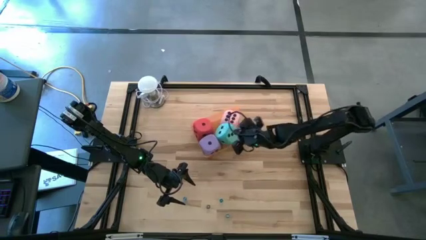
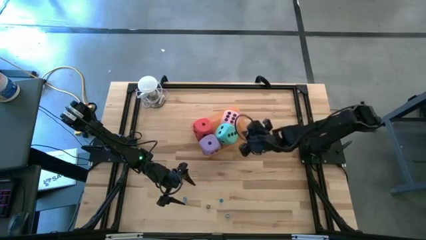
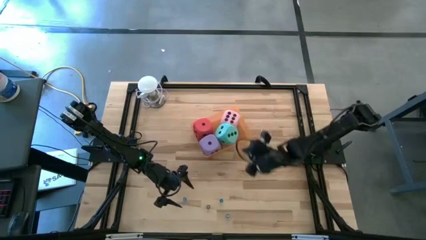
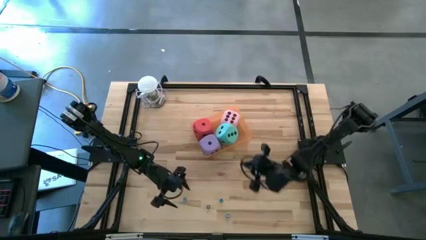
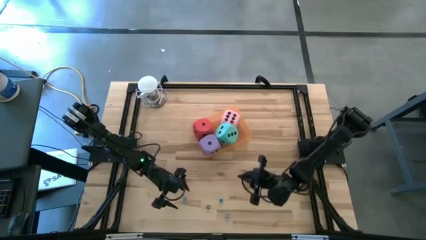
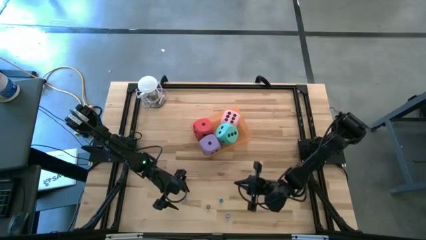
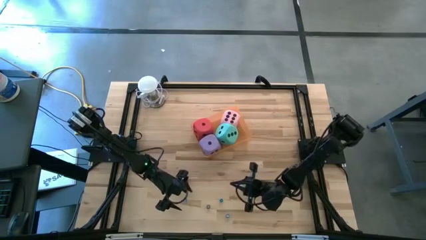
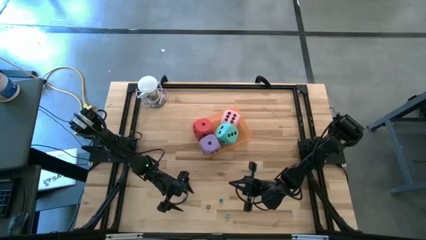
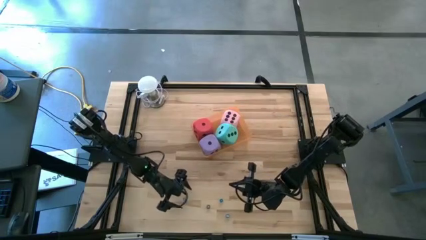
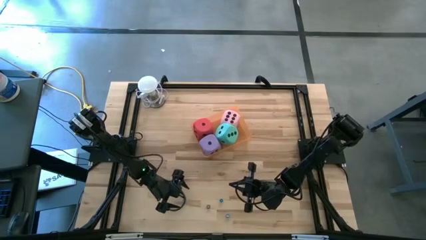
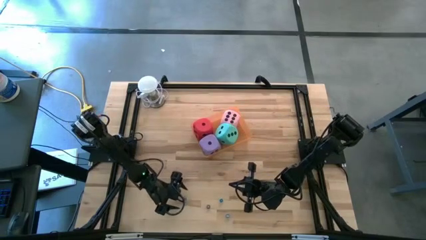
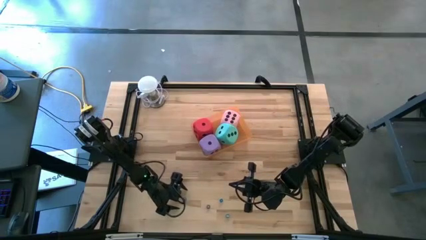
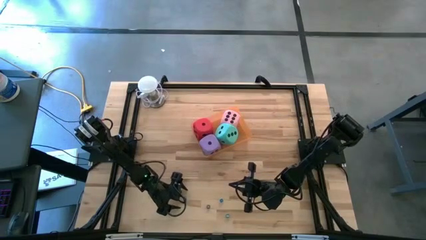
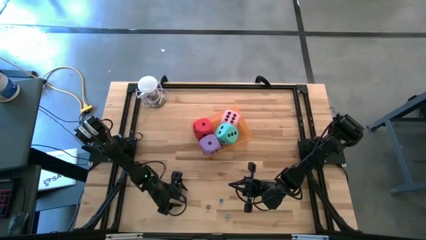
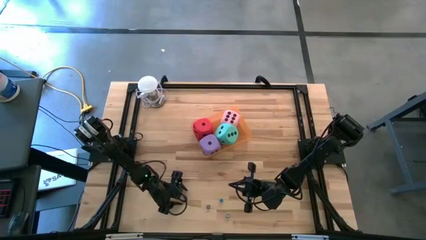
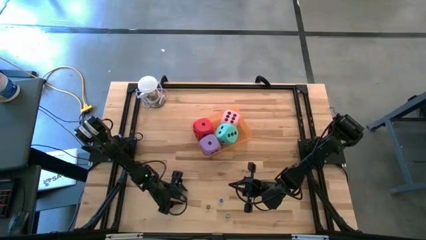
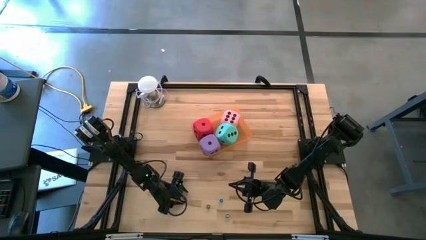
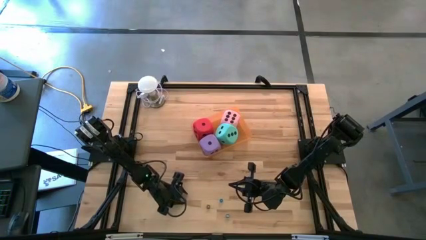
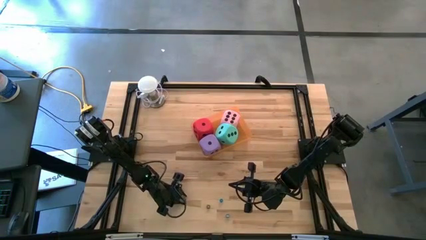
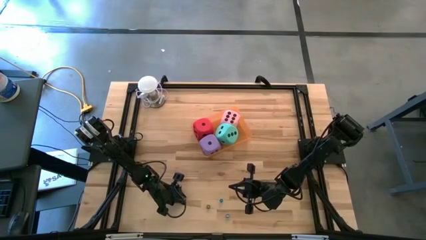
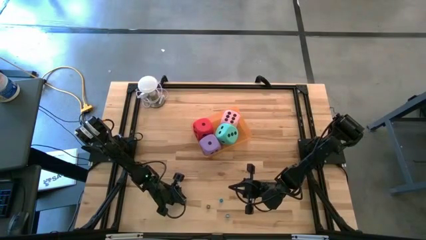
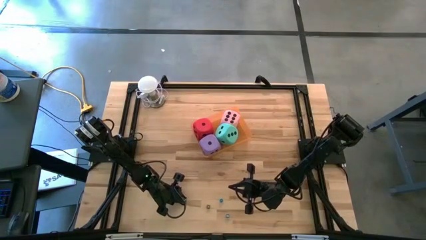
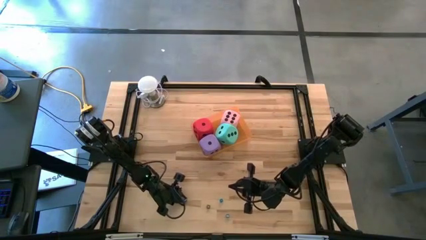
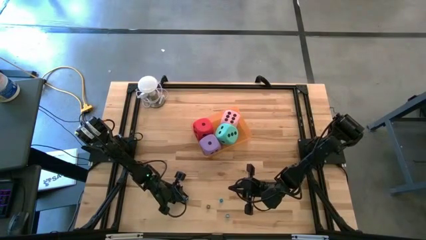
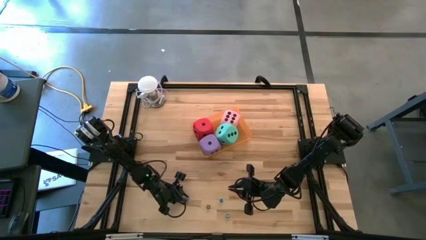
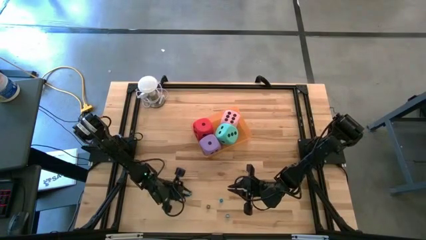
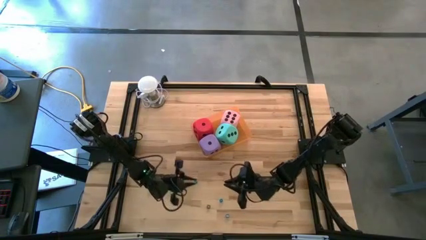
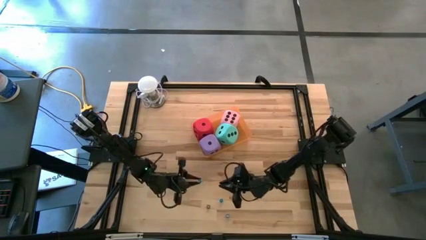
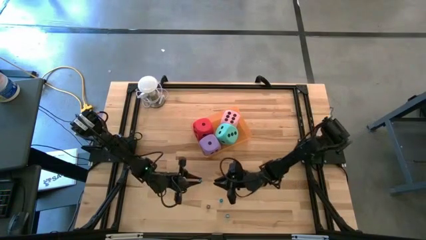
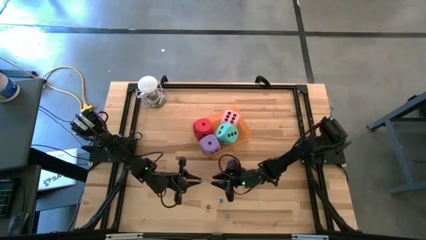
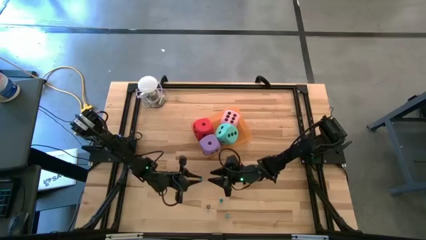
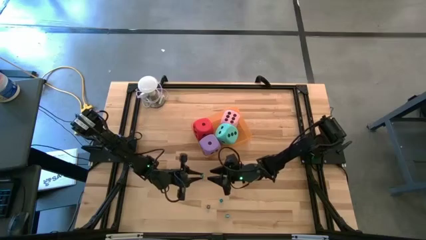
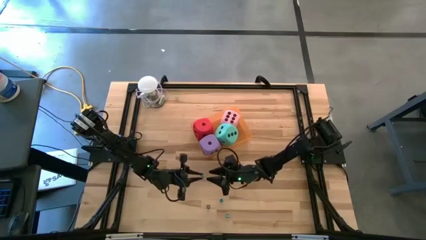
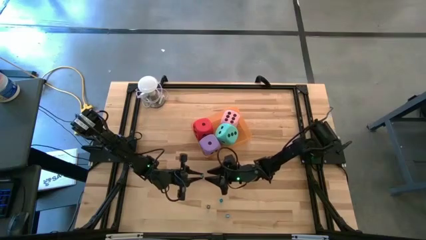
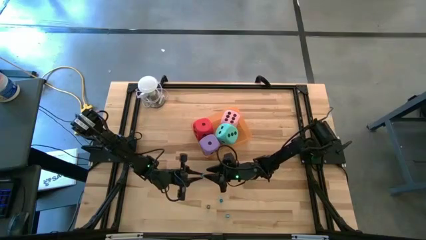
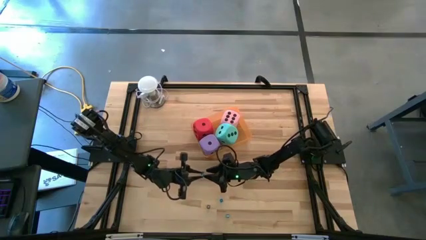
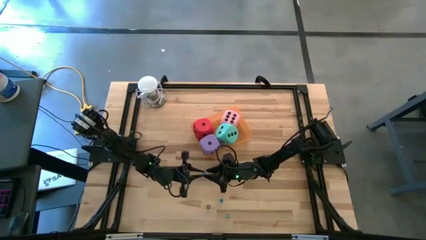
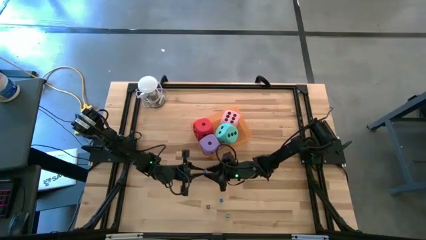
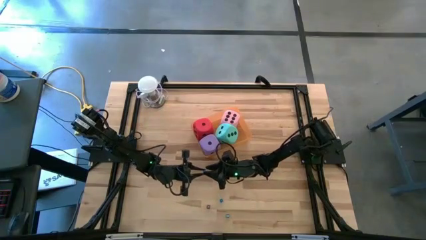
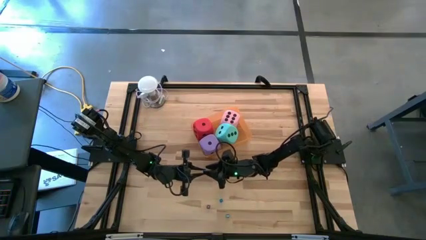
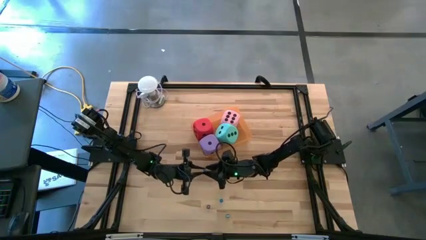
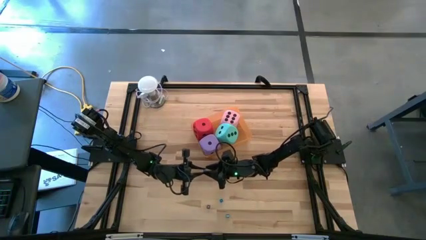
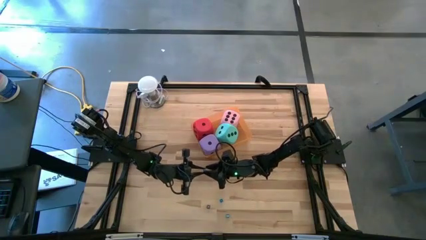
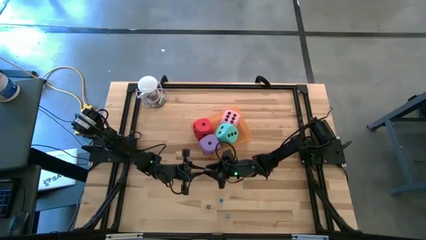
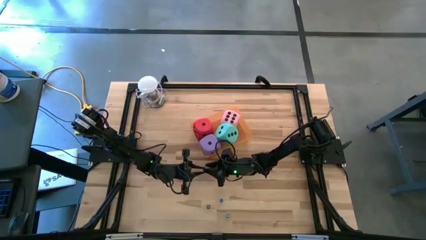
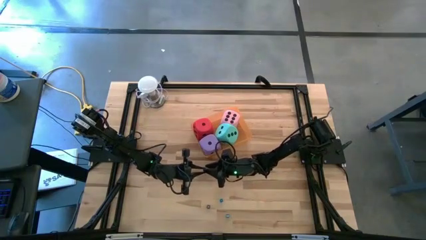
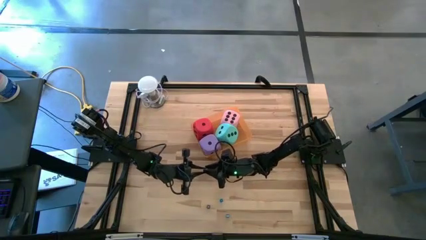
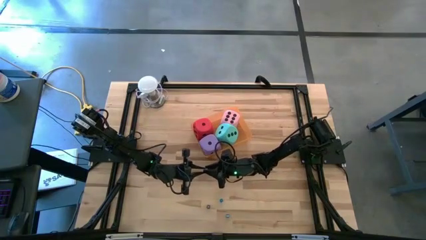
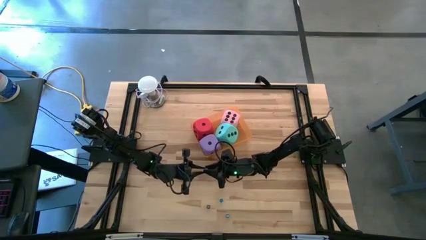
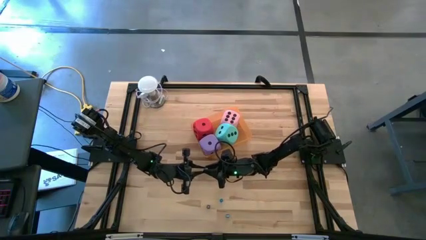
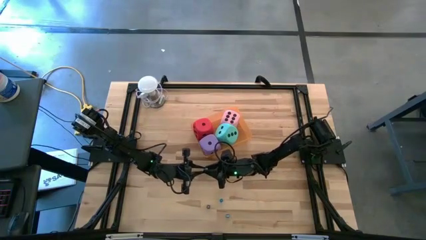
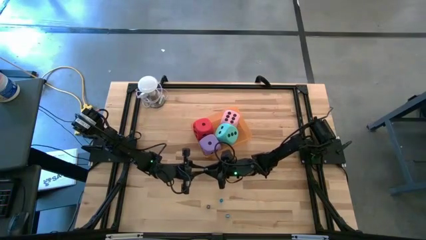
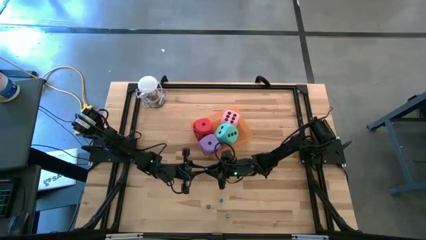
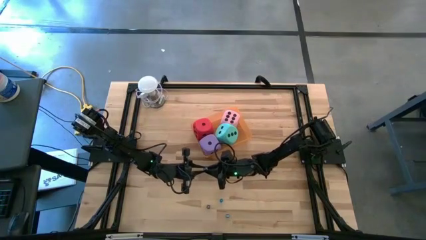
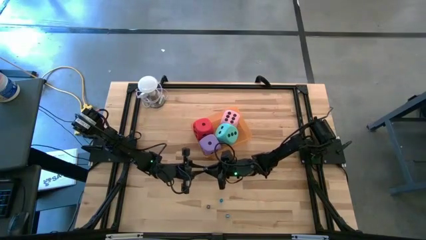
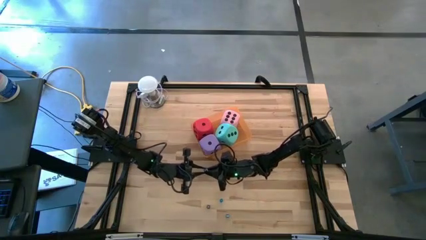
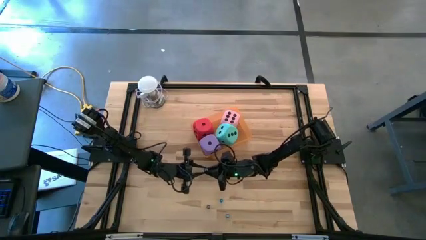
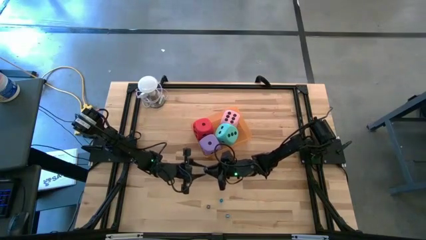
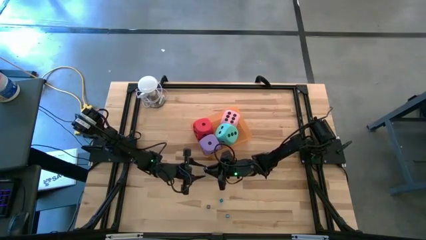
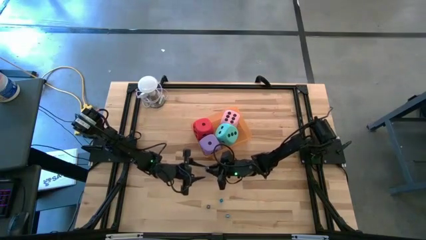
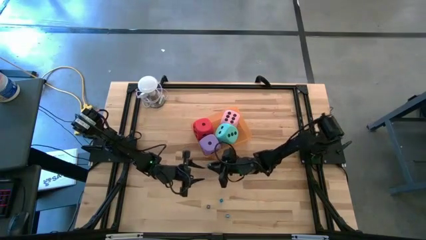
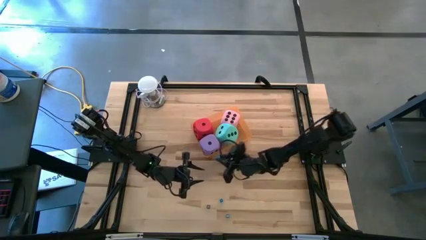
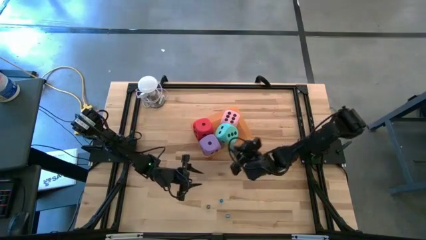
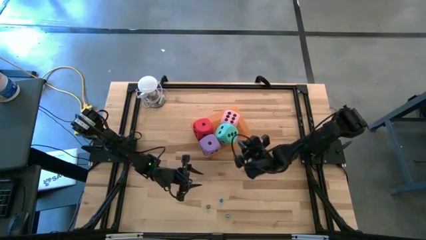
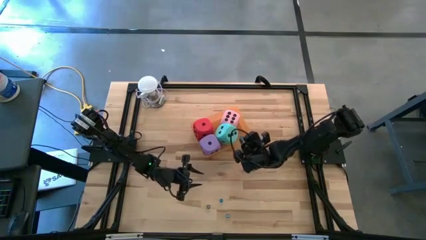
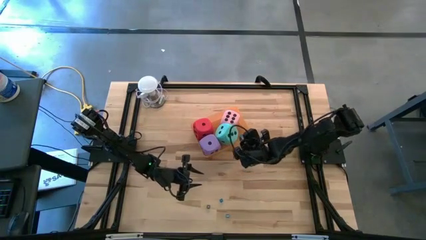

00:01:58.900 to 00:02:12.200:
Task: Pick & Place Dice
Put the small blue dice into the orange bin

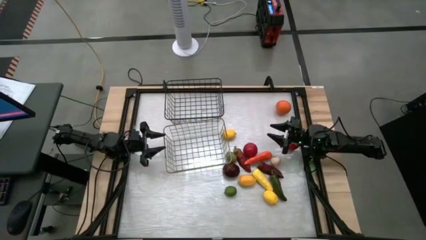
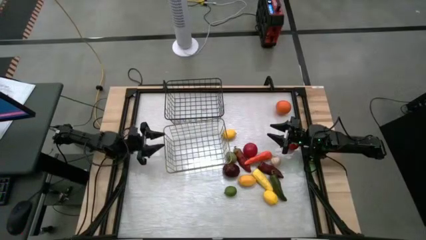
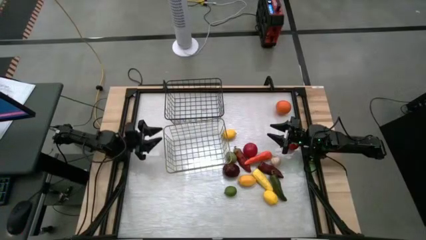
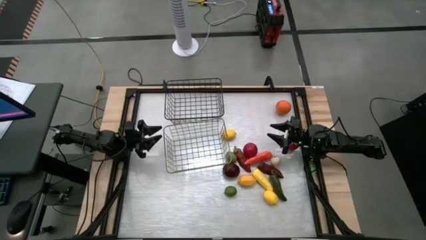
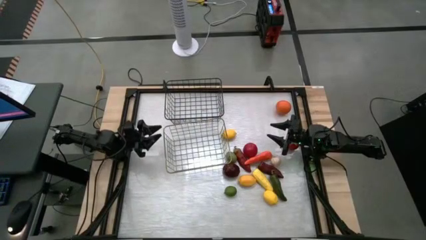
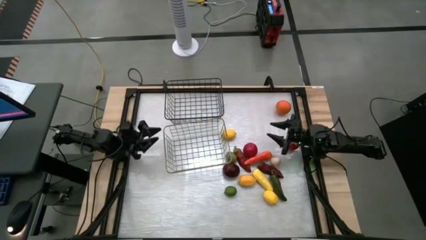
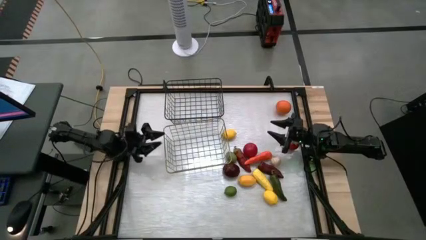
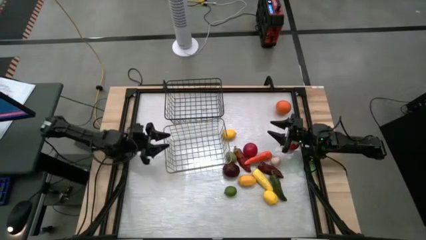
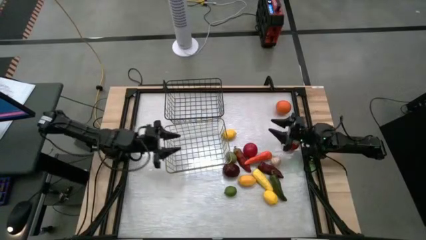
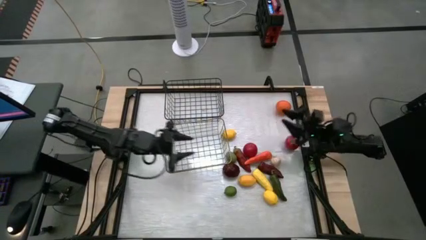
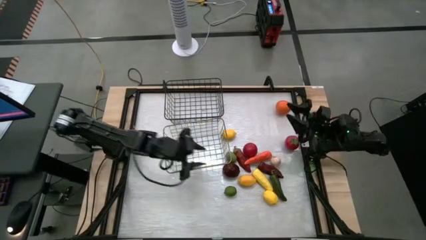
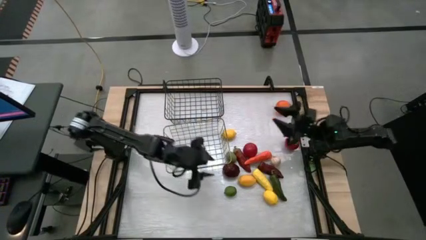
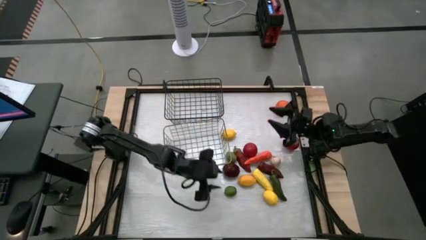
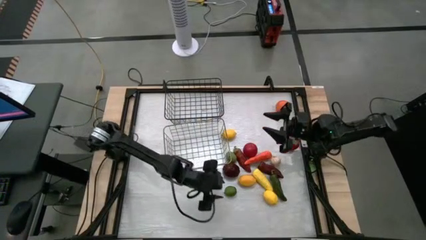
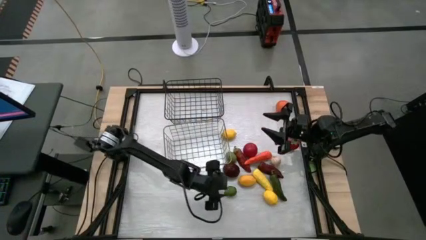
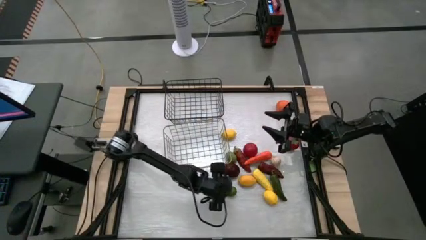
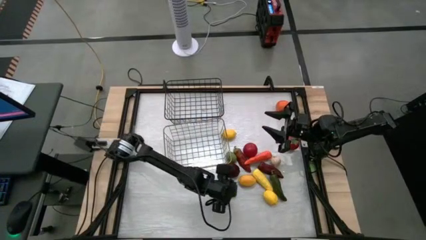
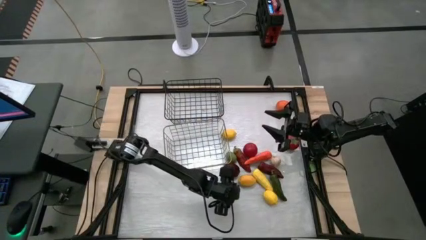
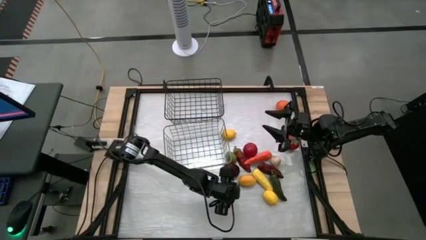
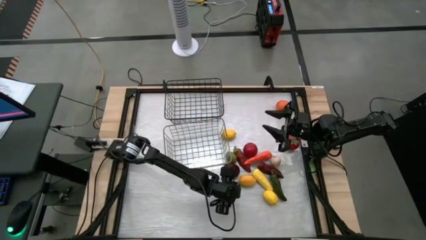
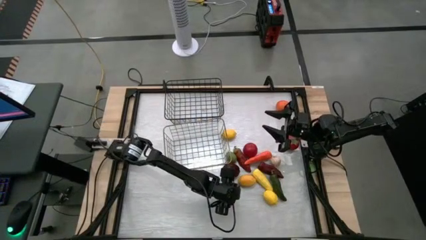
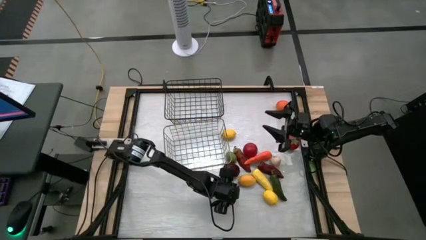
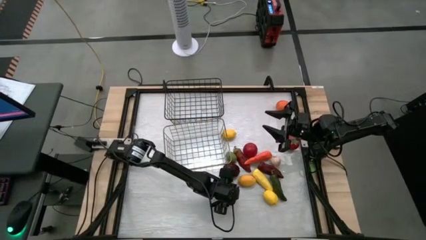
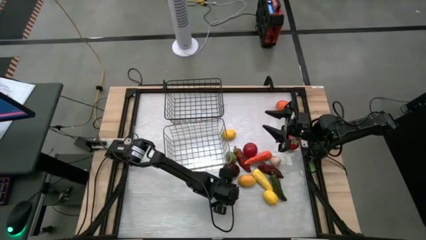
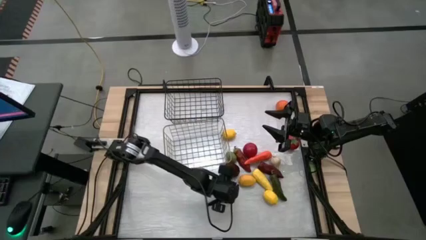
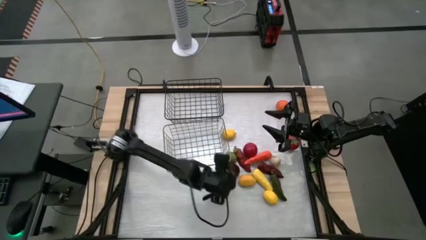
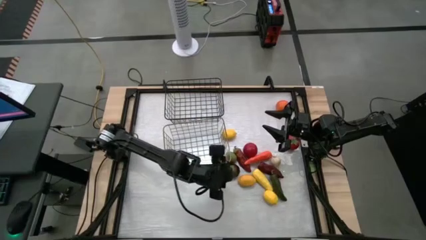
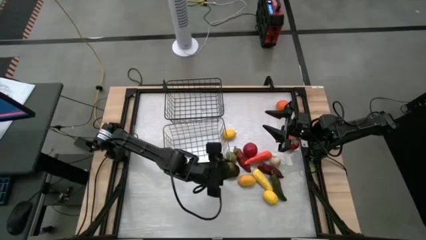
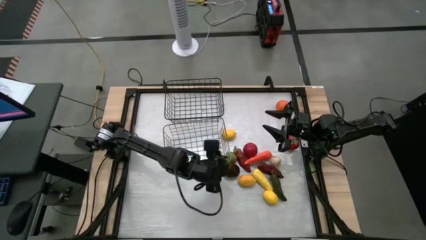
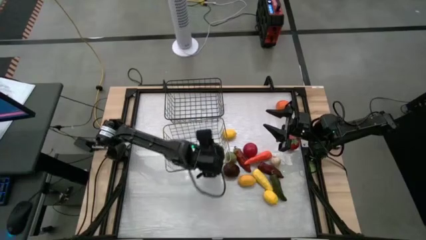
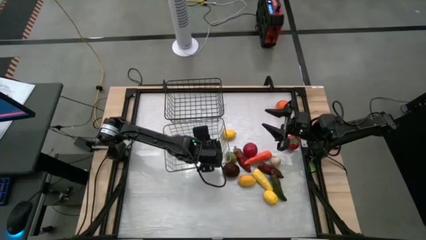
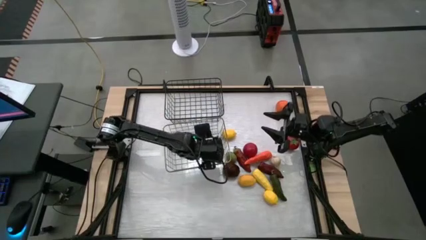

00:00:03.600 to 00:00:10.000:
Task: Sort produce into baskets
Put the bottom green lime into the brown wire basket
